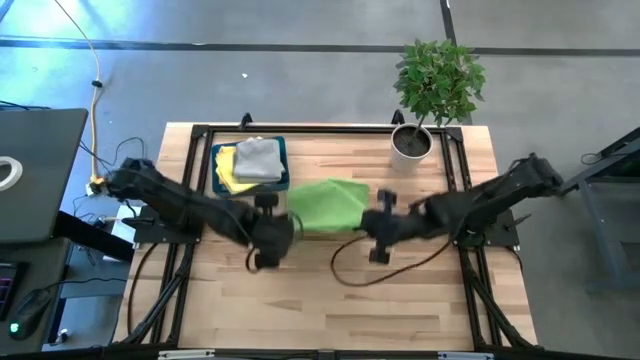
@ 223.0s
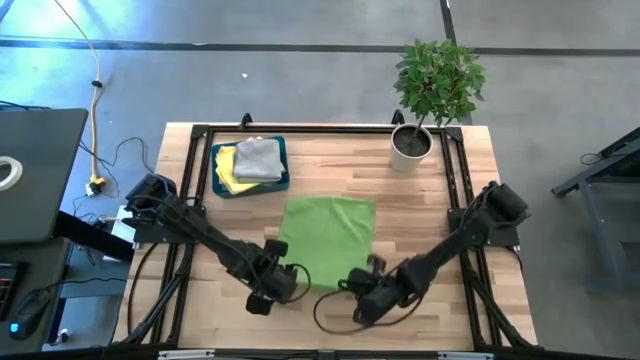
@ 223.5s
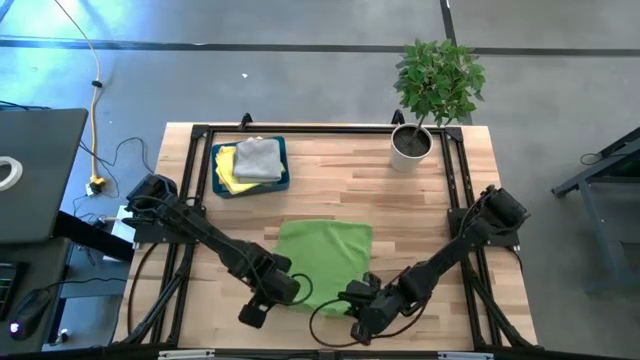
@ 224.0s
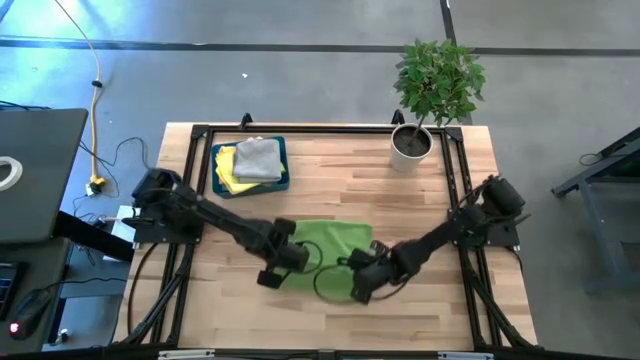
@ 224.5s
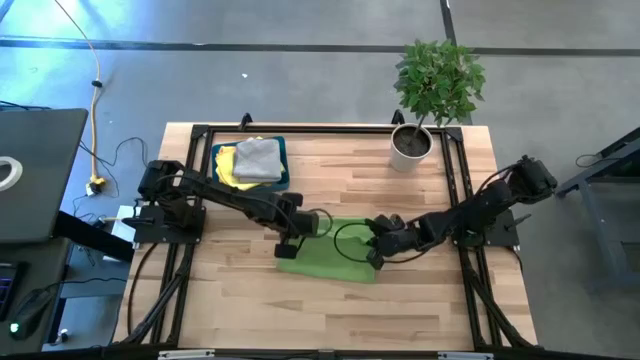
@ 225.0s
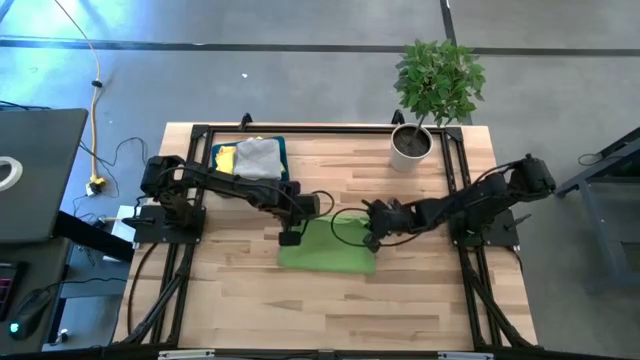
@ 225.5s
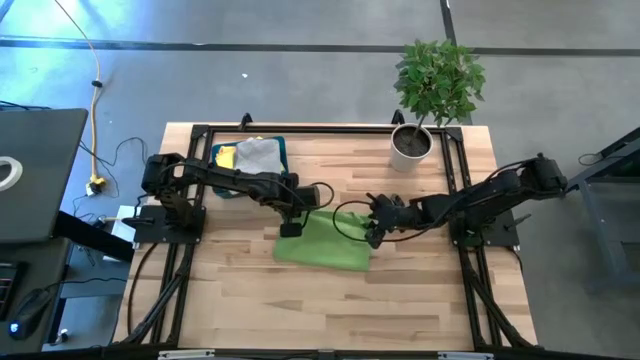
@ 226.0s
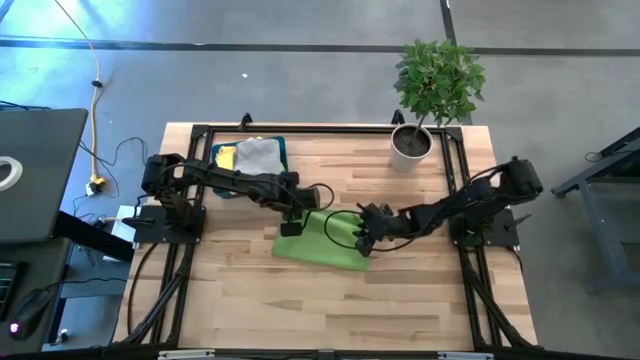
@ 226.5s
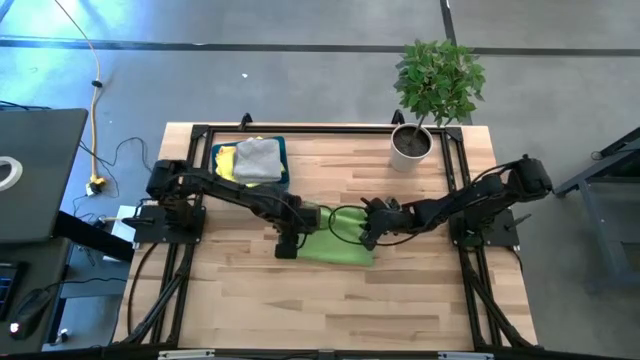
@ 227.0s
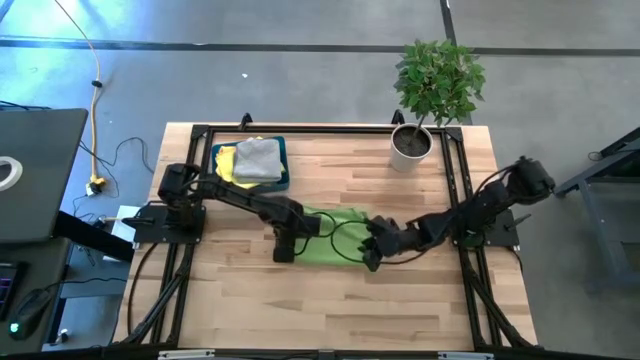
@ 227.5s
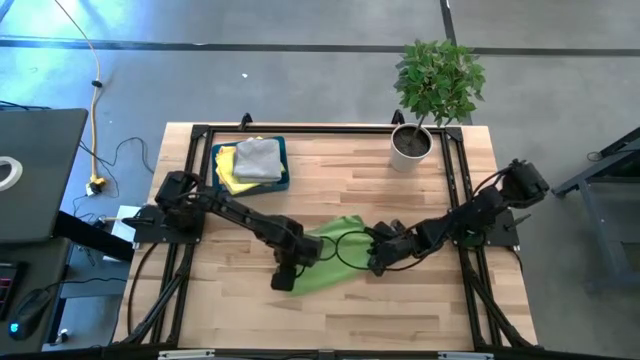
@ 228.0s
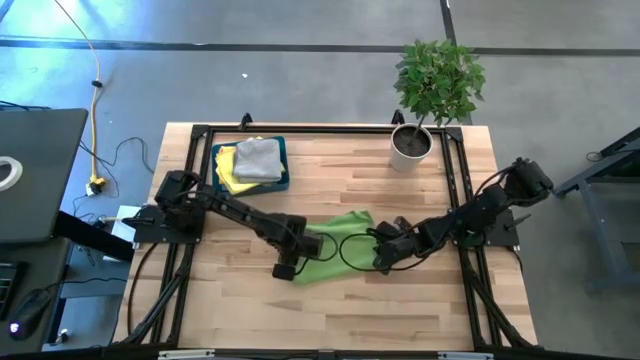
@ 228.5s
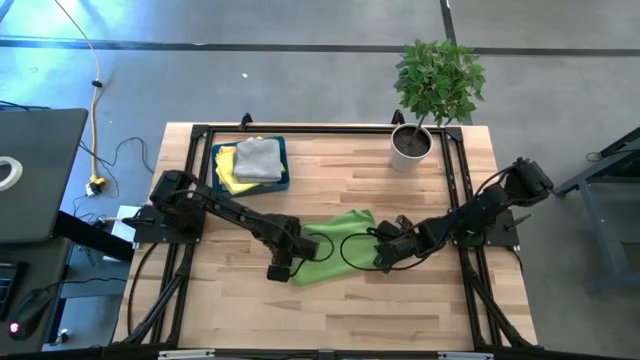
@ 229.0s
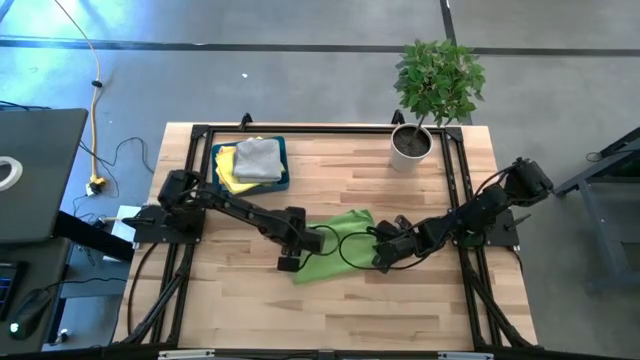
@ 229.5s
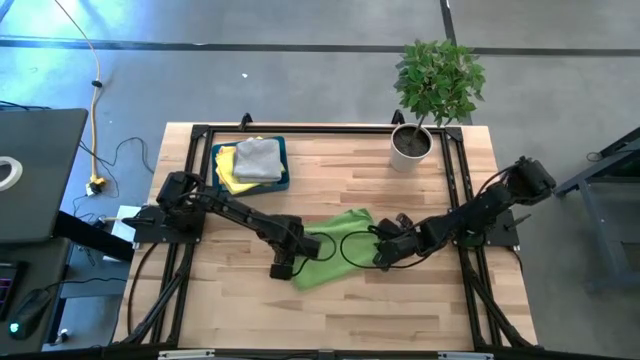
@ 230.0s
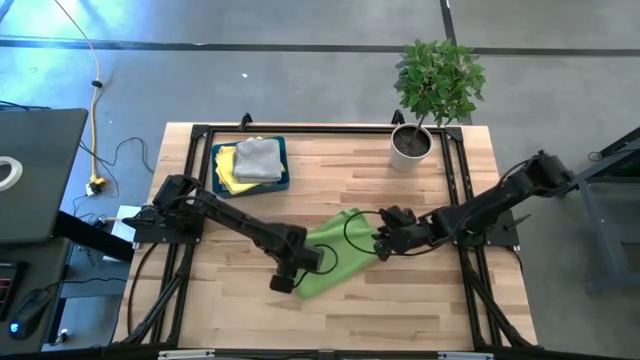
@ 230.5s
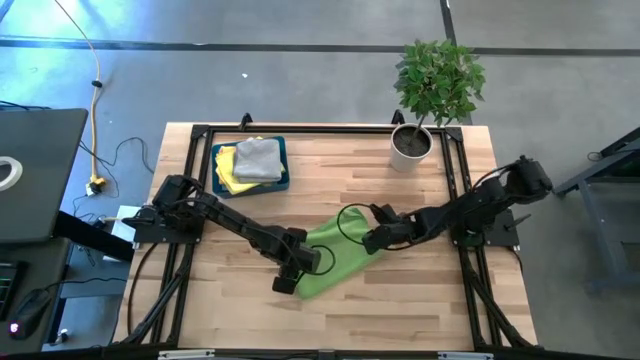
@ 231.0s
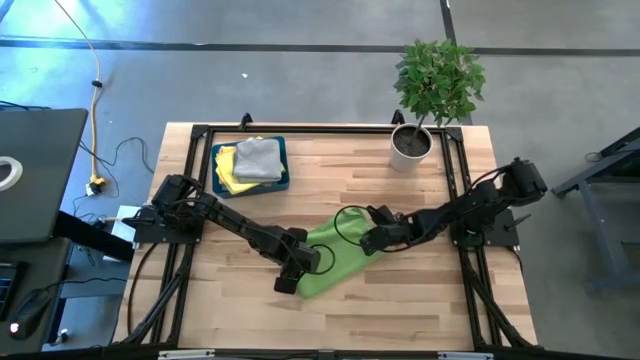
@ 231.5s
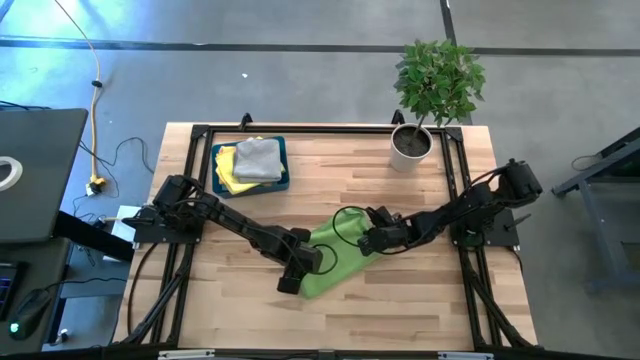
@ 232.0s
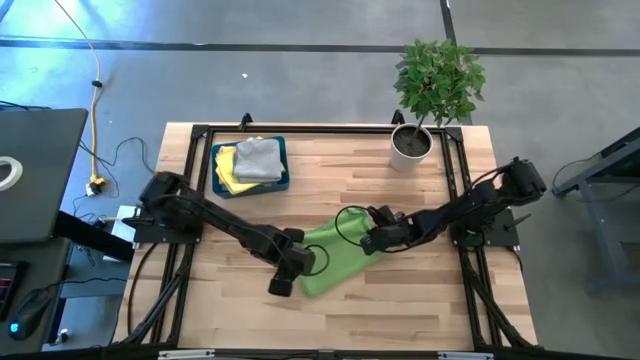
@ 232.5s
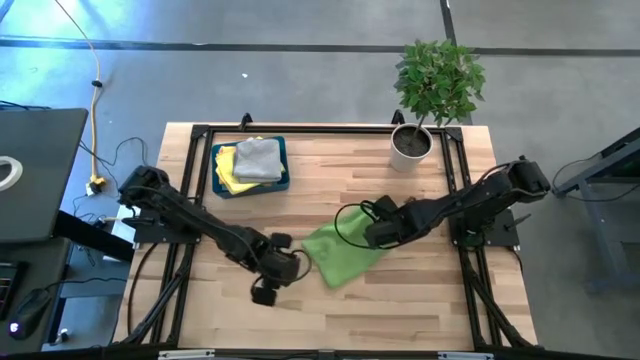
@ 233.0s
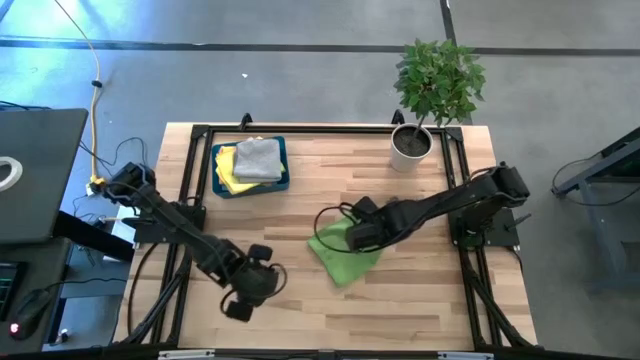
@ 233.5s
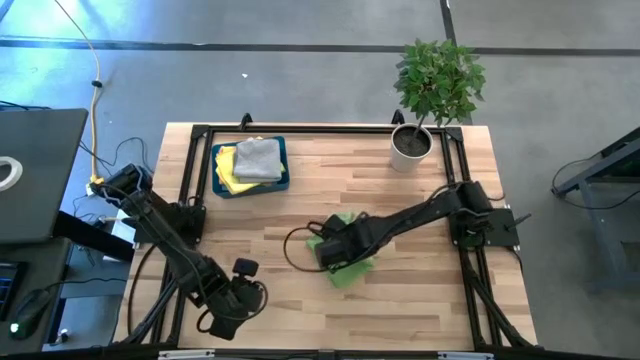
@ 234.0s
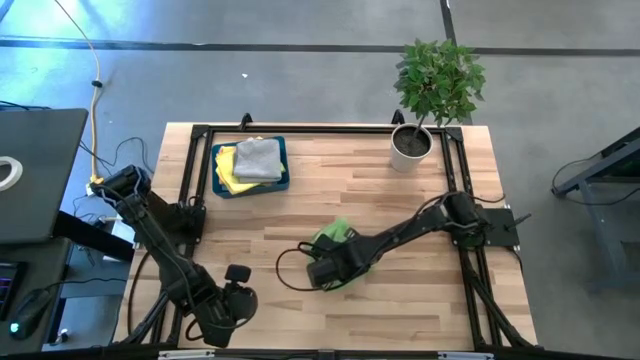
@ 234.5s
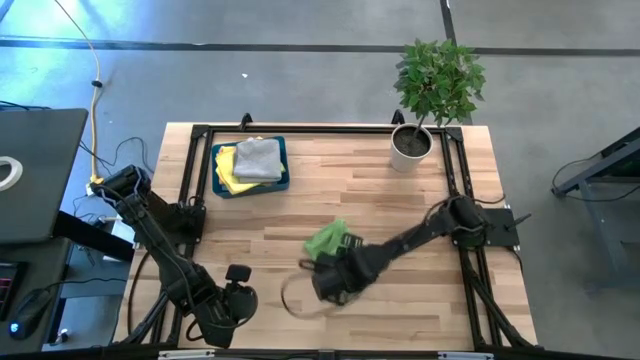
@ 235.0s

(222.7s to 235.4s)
Task: Fold microfiber towels
Fold the green microfiber cloth

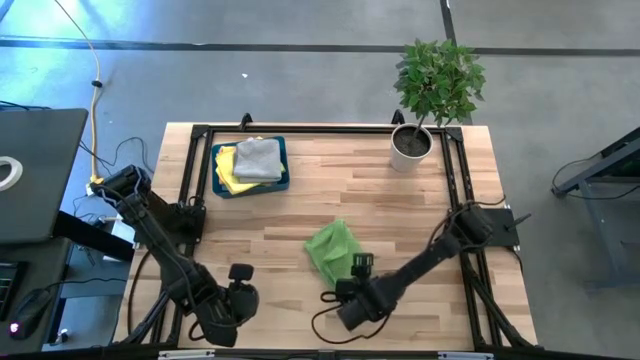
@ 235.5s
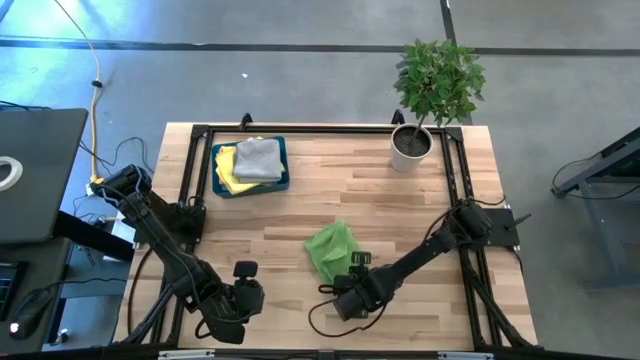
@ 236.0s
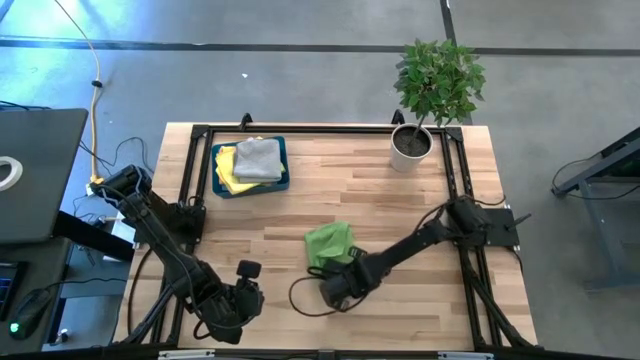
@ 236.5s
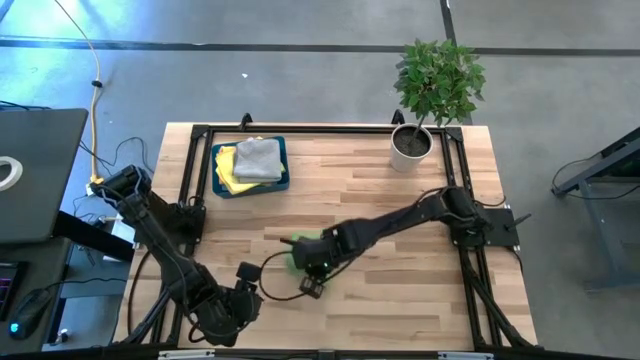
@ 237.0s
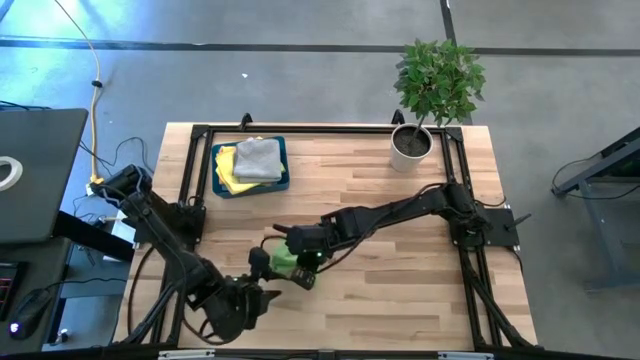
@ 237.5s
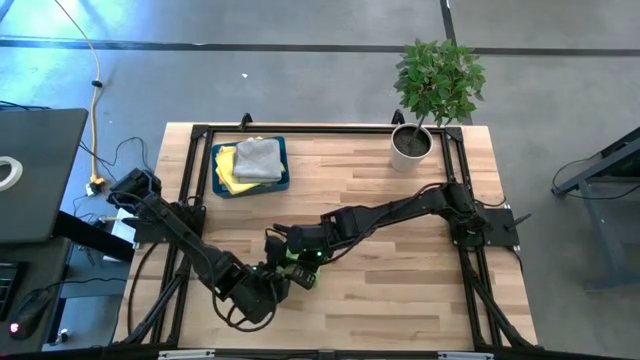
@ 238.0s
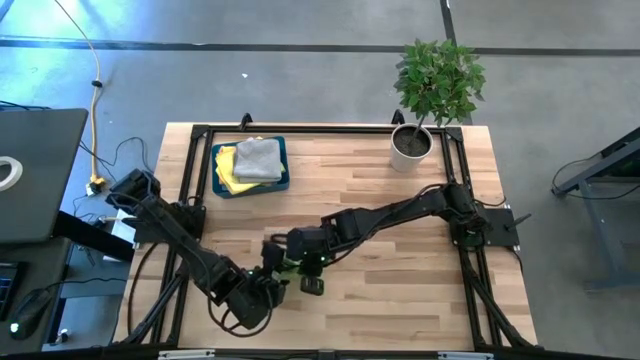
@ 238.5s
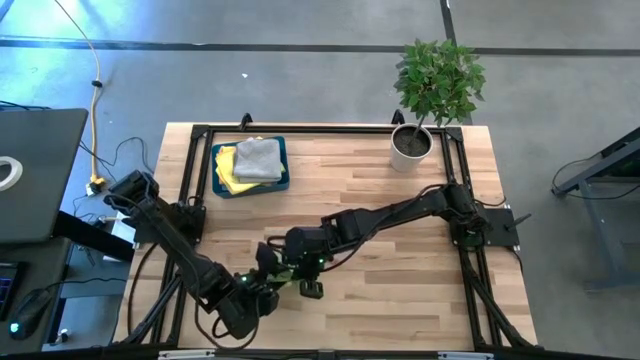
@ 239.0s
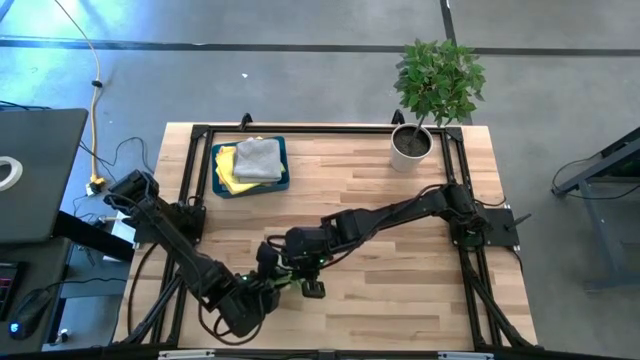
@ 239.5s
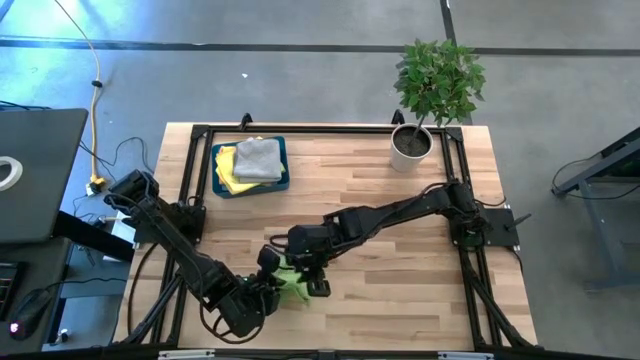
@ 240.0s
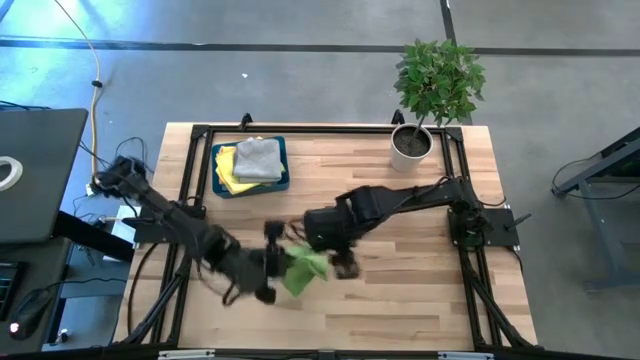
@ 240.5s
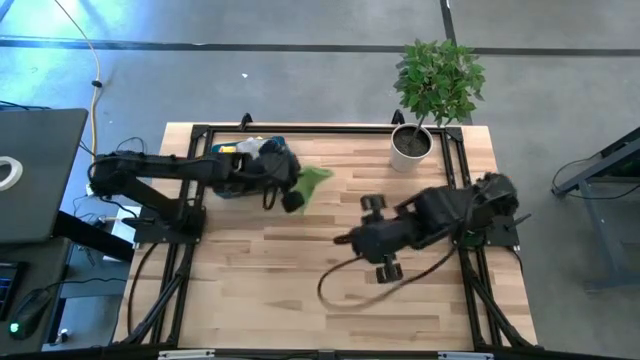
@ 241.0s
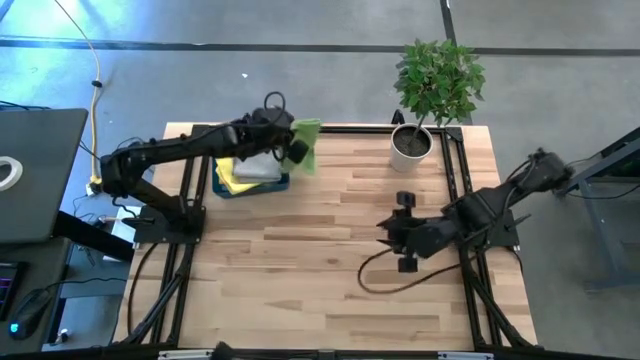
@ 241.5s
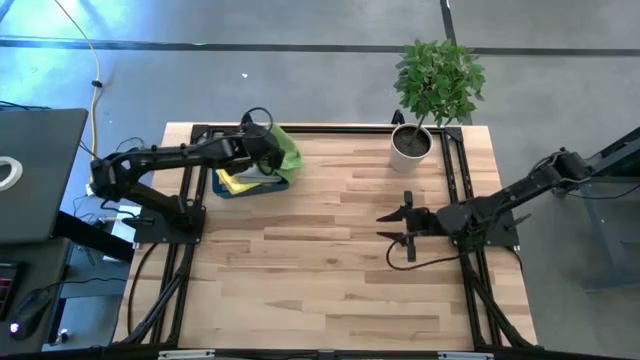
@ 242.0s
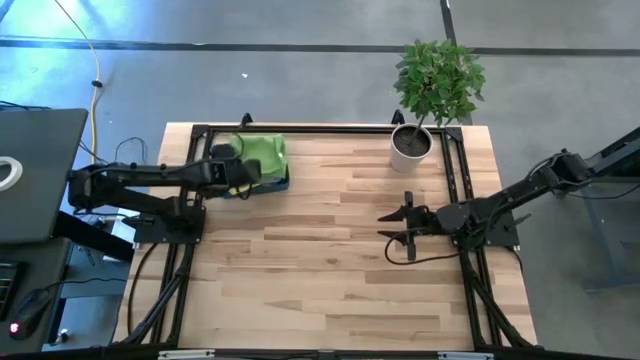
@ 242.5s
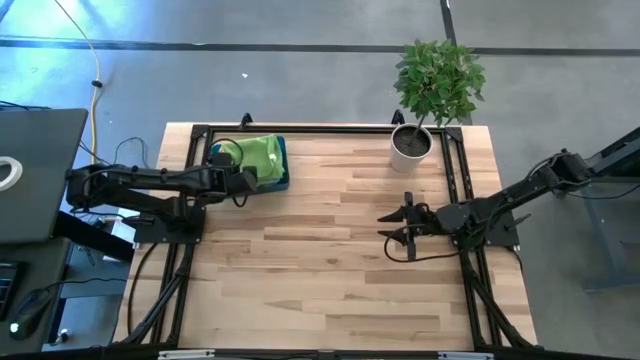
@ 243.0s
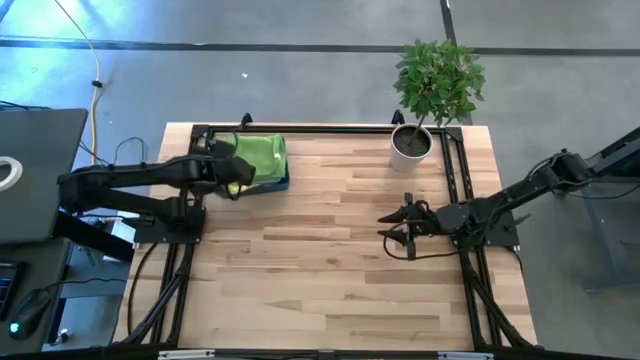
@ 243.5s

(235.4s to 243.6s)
Put the folded green microfiber cloth into the blue bin
